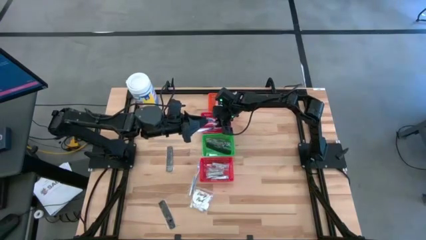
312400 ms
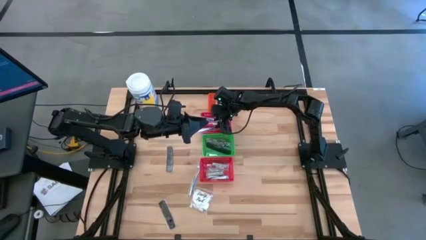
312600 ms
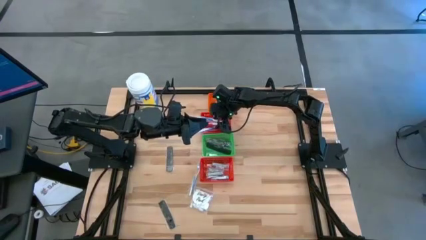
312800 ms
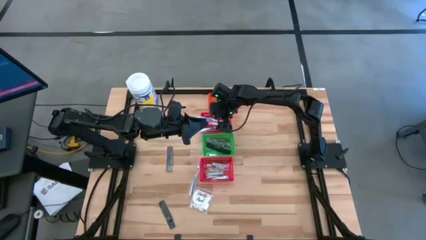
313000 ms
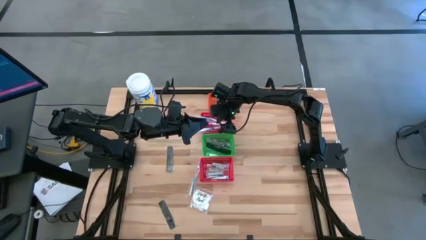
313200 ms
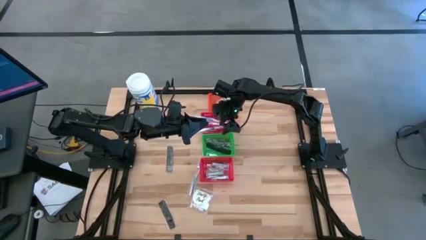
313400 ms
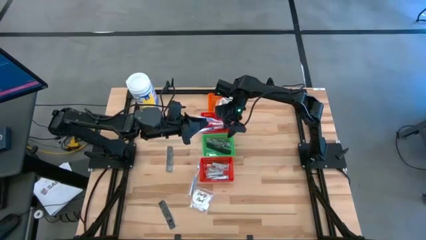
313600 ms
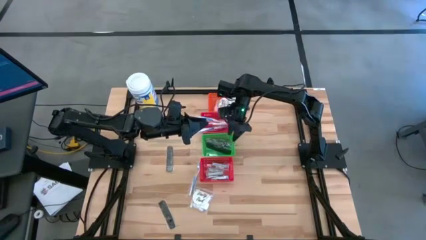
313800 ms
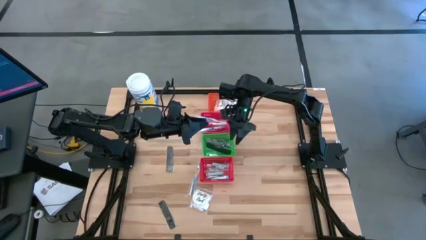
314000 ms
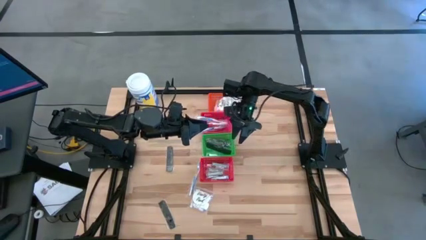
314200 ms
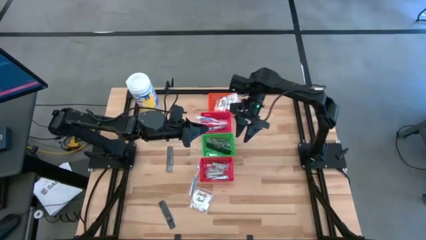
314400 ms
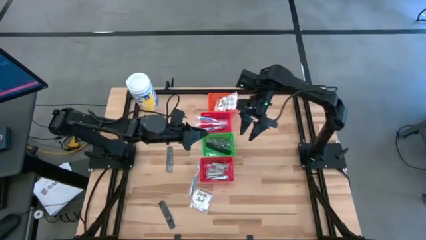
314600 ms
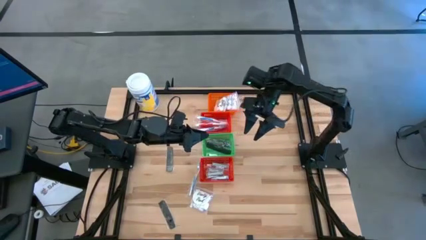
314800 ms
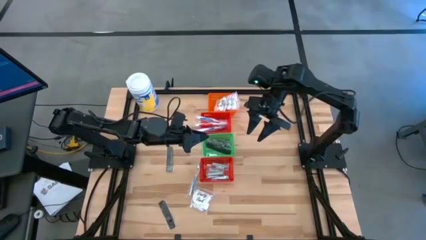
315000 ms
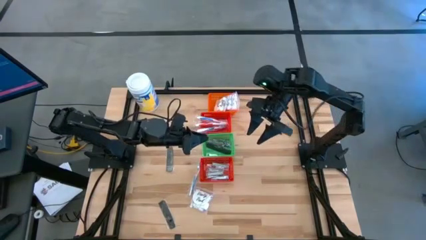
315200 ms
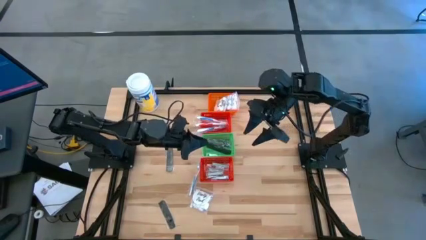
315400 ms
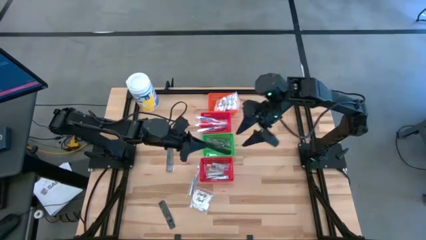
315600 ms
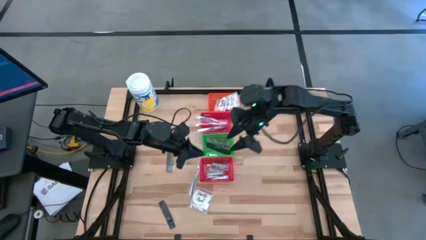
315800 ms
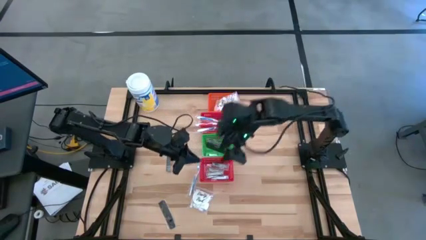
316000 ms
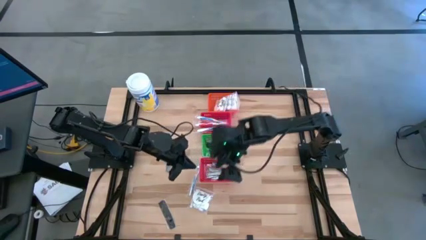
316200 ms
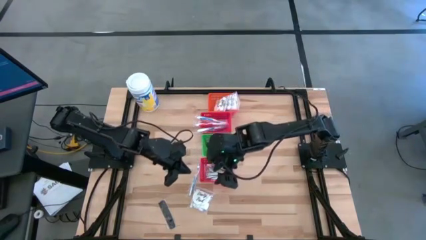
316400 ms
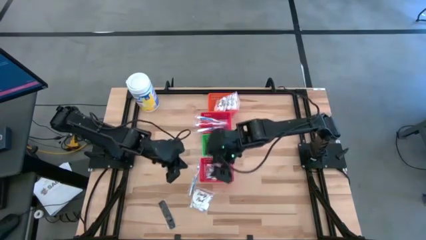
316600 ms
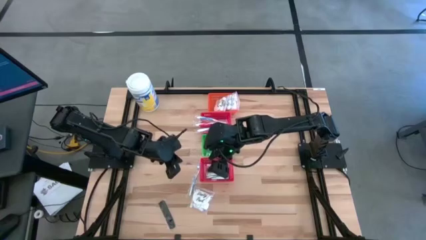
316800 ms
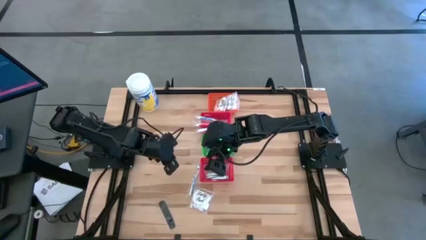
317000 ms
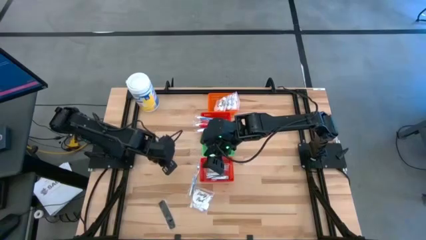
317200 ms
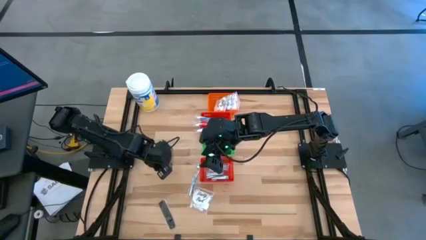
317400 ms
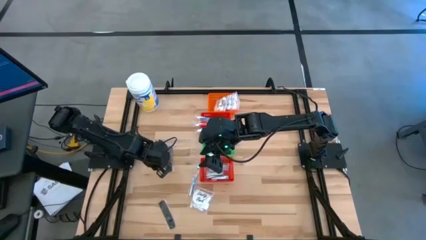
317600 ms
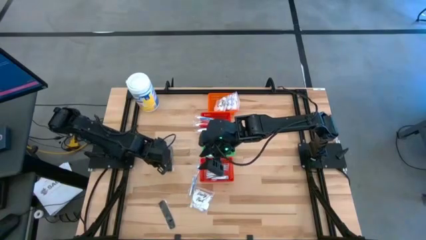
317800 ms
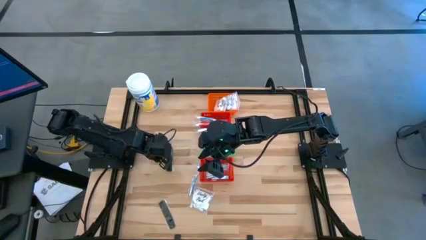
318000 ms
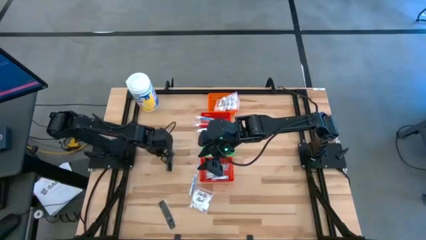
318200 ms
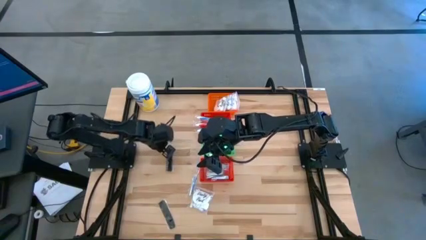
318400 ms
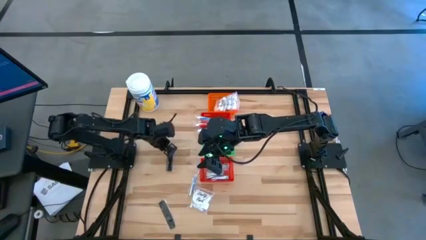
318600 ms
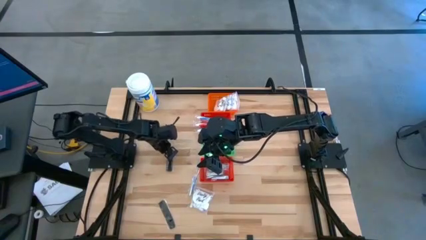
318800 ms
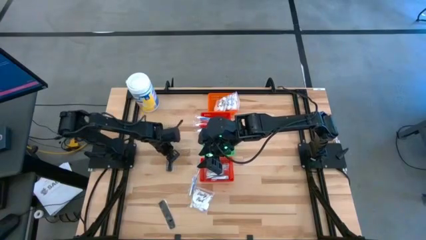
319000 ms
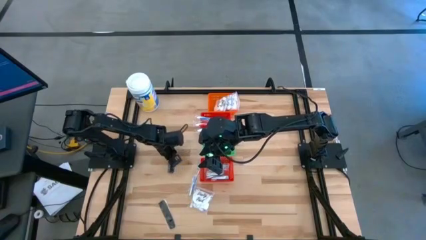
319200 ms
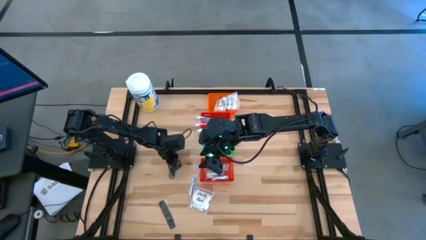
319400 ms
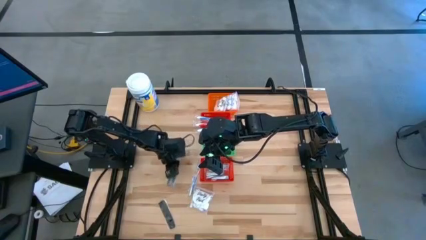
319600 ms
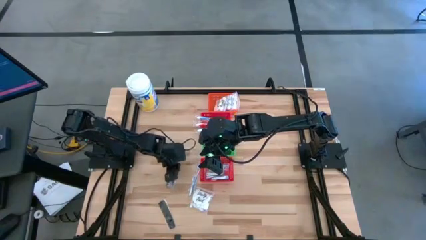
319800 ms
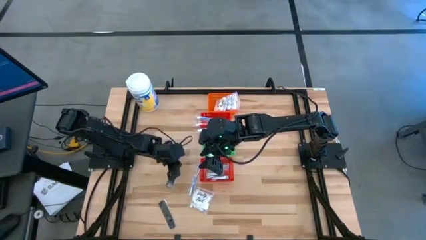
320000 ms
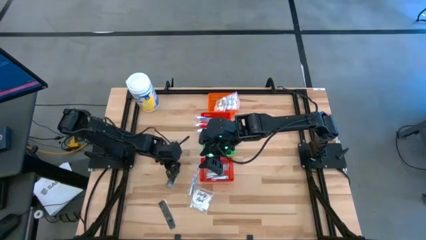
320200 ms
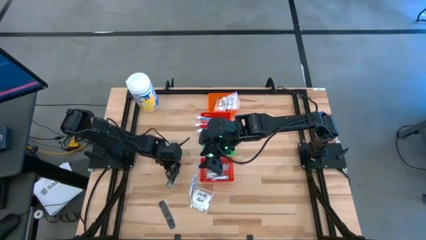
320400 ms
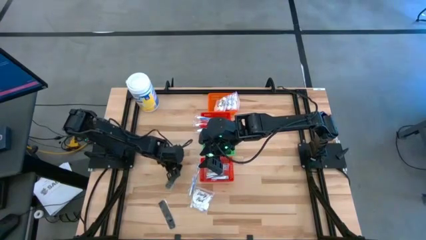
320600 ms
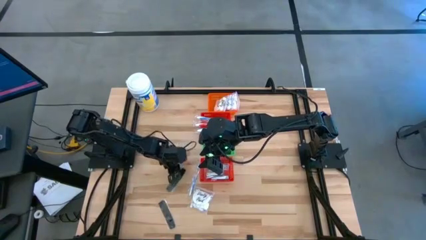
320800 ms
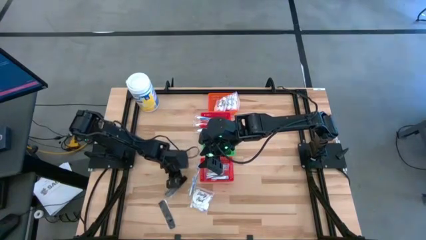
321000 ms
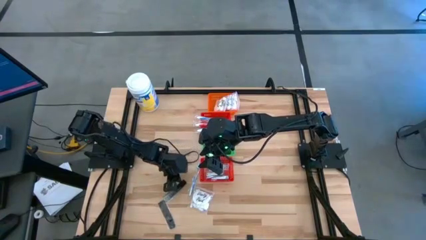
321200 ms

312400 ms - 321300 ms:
Task: Pick & Place Travel size toiletries
Adjust the black comb

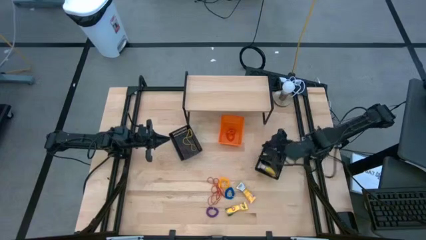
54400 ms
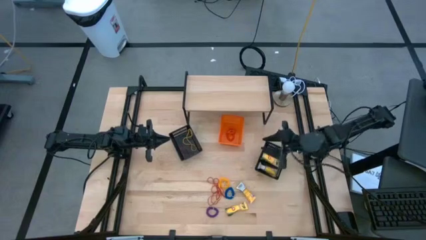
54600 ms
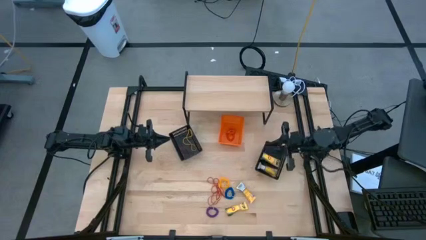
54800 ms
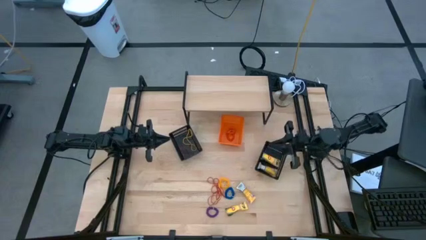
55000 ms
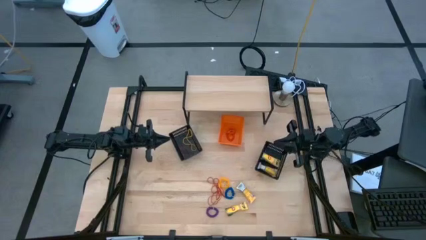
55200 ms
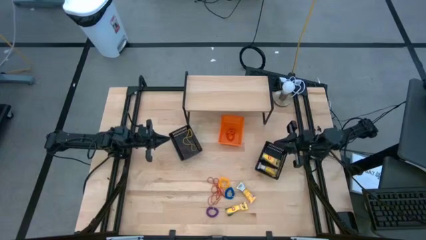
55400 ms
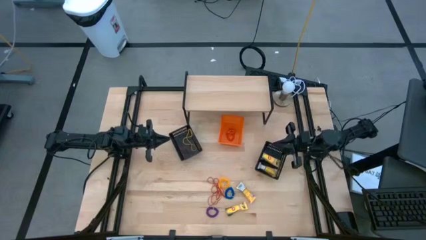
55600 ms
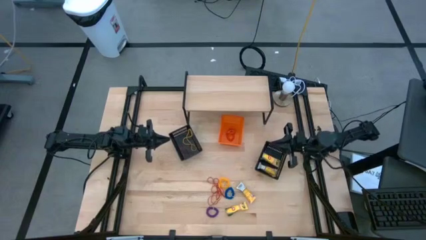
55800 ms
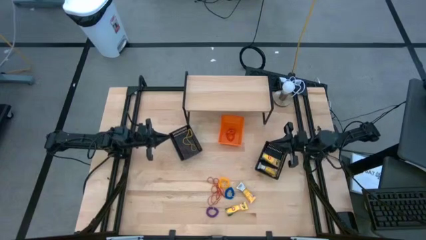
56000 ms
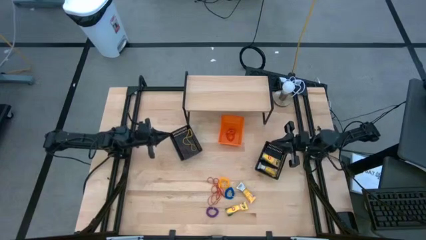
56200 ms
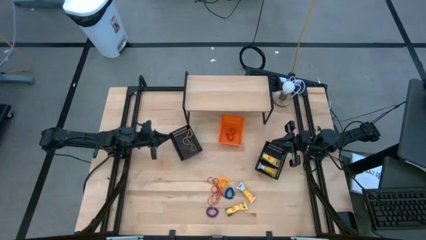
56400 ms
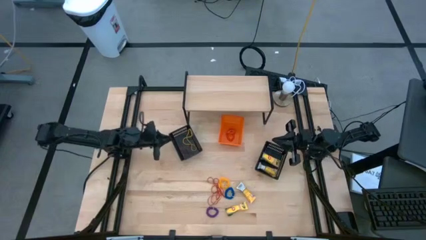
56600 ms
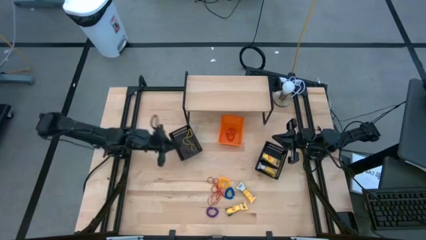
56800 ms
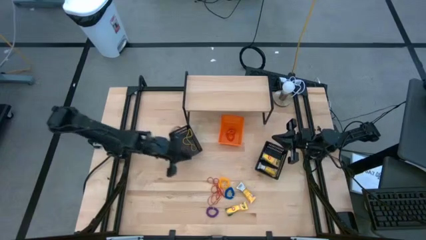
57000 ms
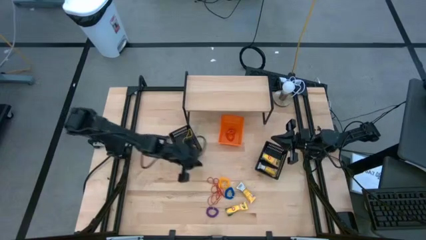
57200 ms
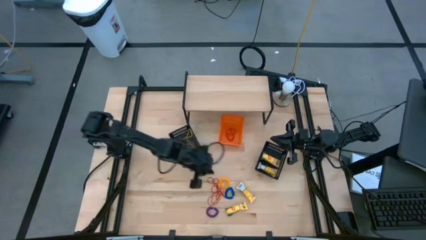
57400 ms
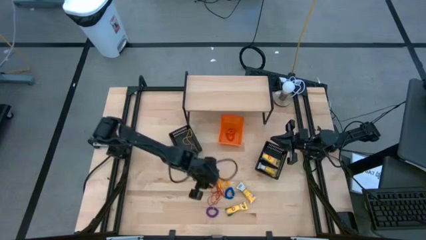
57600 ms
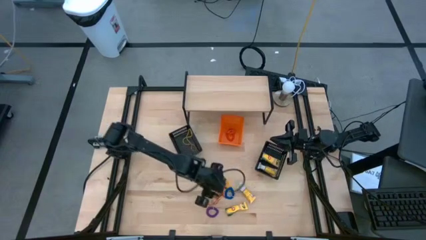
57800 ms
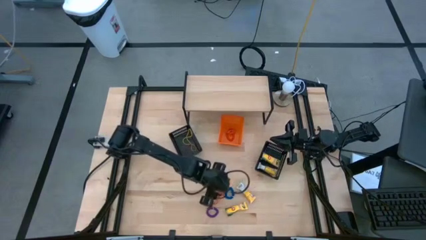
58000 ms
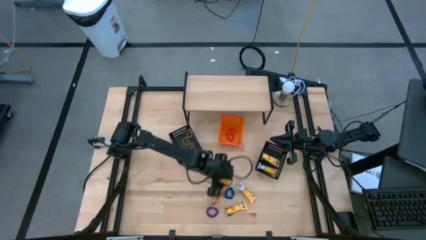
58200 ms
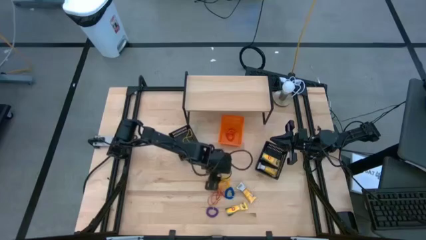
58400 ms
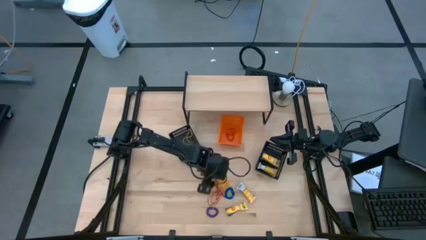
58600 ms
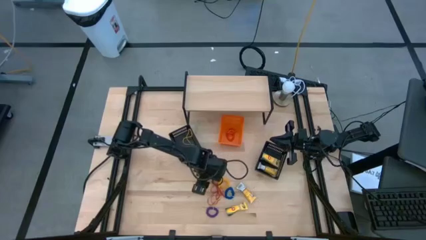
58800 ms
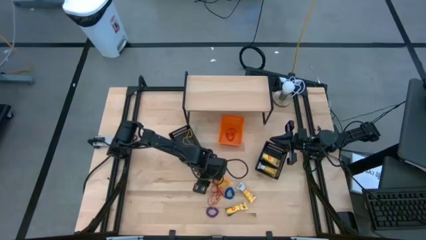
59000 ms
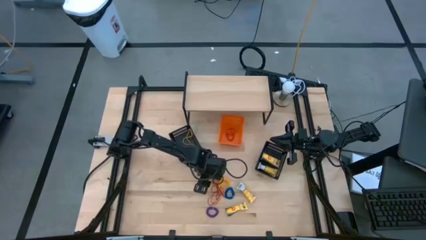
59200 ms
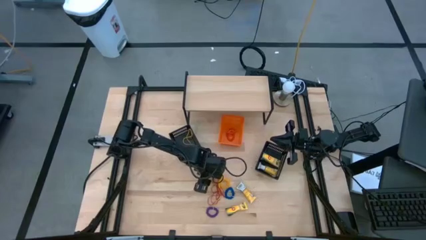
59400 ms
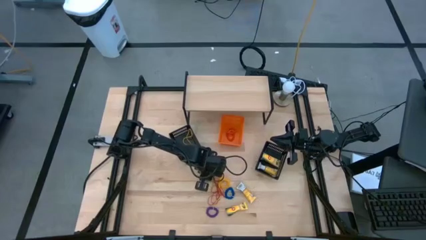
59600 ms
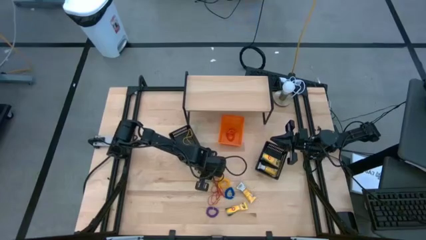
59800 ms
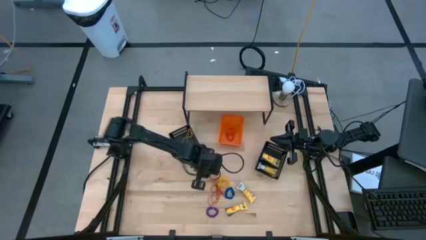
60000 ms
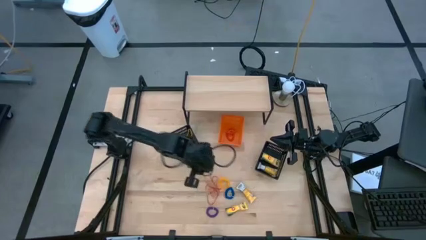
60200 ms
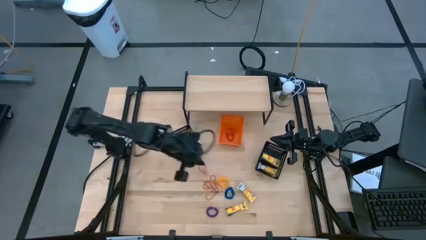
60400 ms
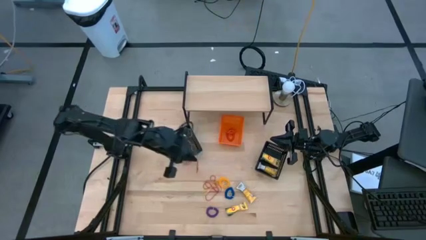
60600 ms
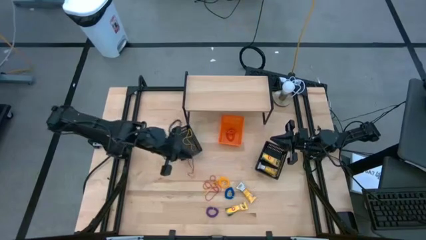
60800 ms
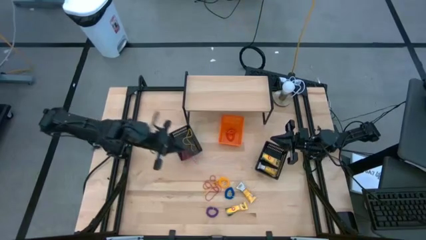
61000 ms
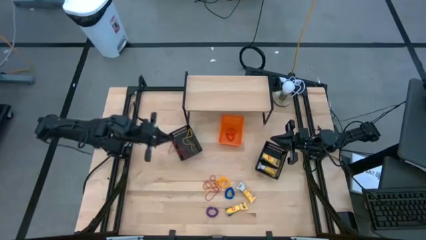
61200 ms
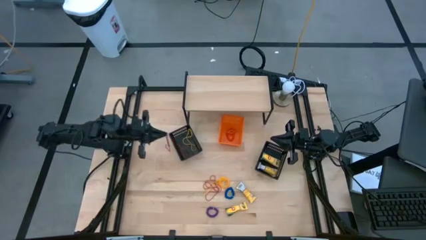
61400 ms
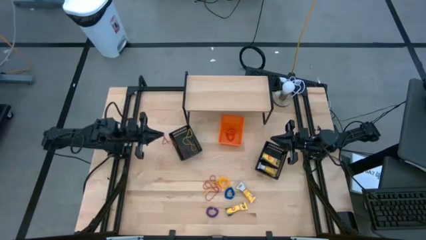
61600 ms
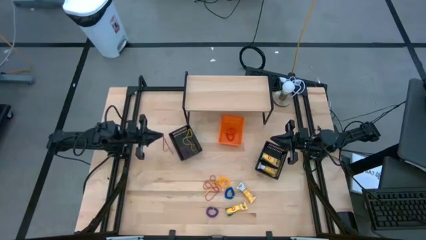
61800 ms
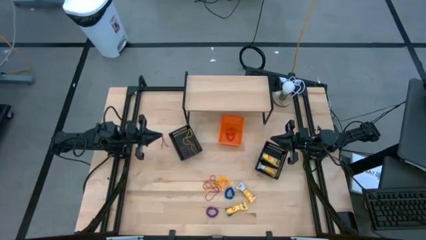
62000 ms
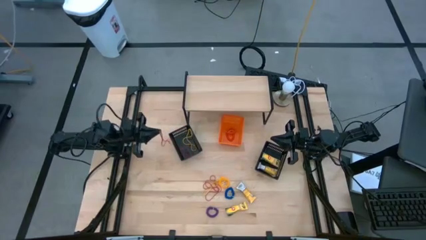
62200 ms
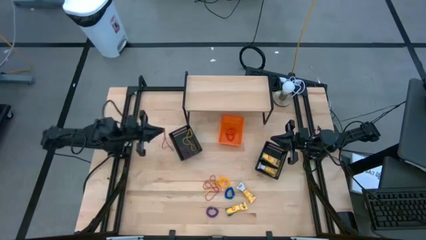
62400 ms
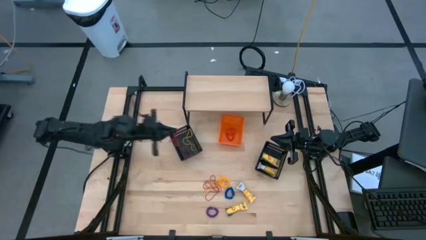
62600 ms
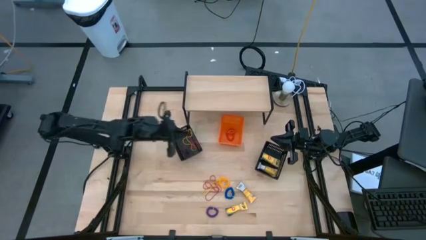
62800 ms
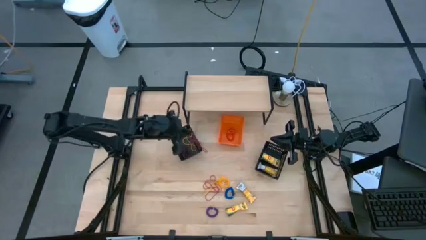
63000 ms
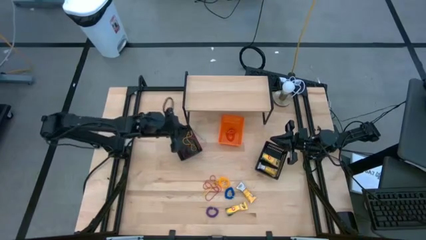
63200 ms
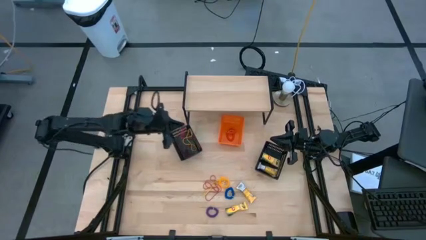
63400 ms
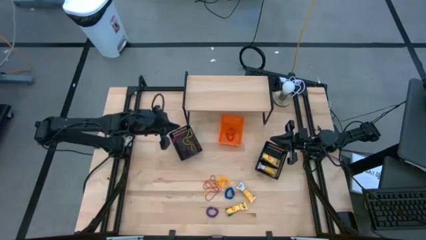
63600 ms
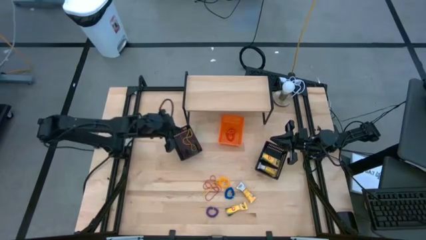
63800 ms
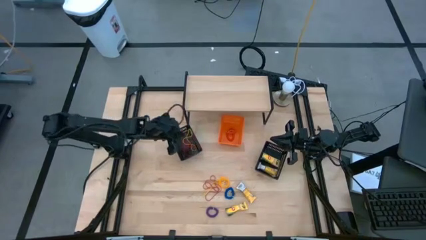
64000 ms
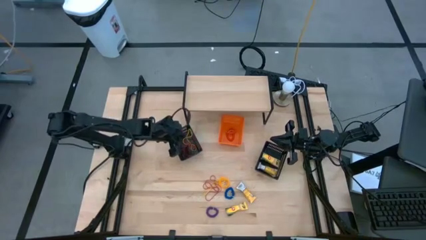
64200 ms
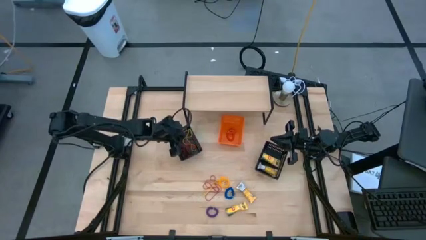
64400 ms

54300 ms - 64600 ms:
Task: Pick & Place Office Desk Supplies
Put the red rubberband into the left black bin
